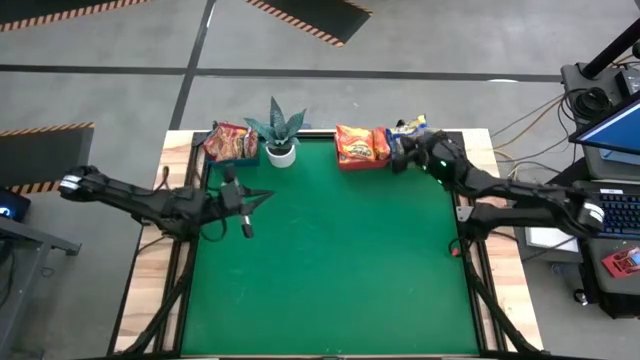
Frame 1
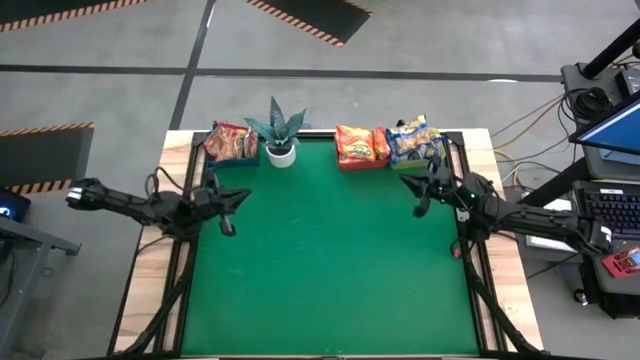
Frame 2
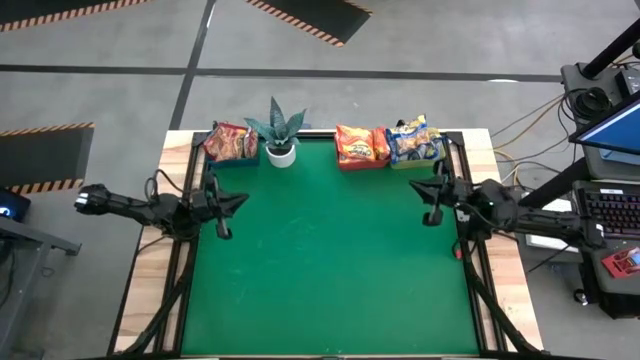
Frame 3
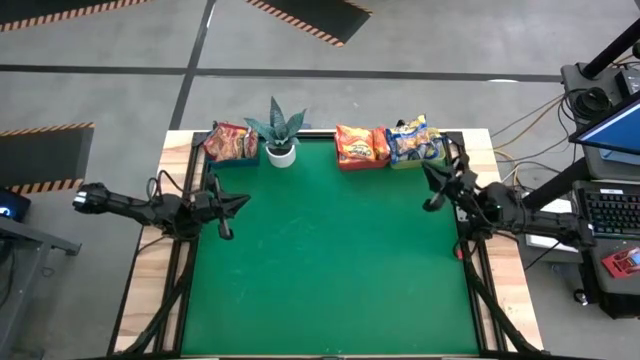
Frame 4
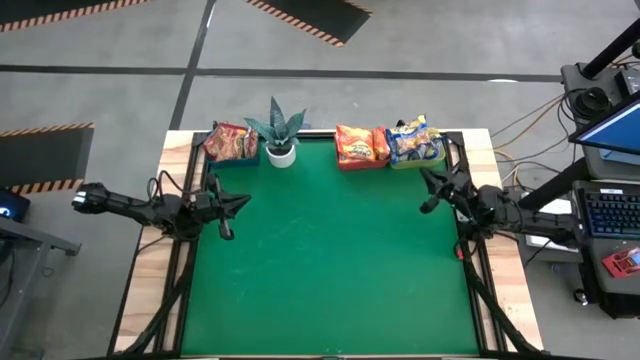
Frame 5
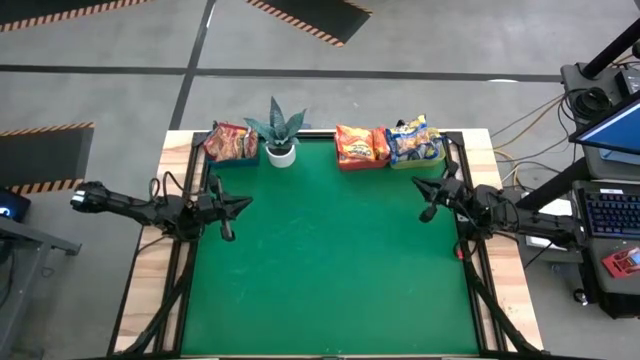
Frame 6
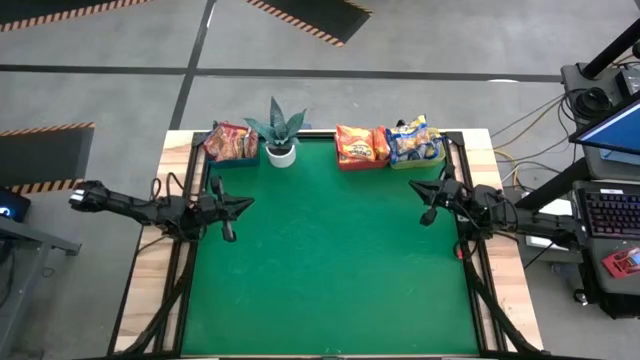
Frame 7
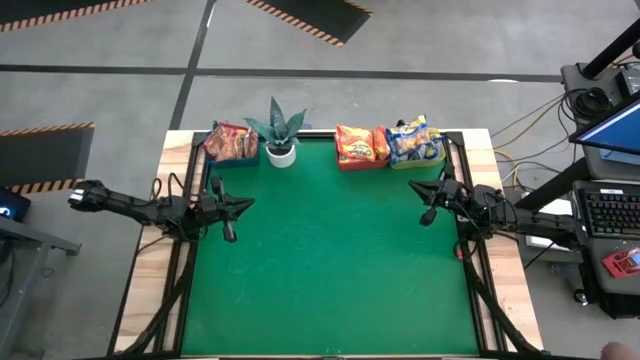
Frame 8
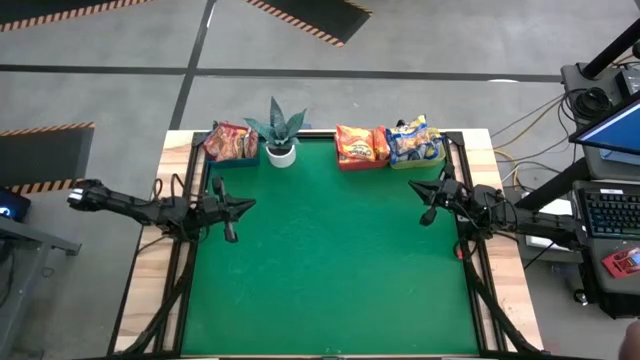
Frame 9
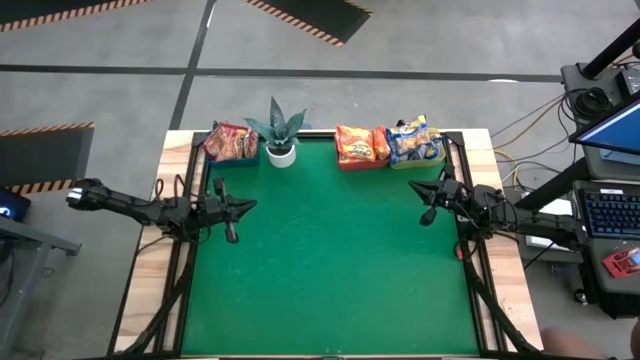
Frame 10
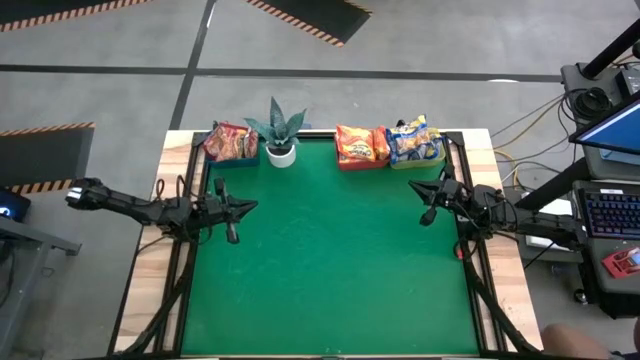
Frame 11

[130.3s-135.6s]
Task: Sort Maruchan noodles
Return to Home Position

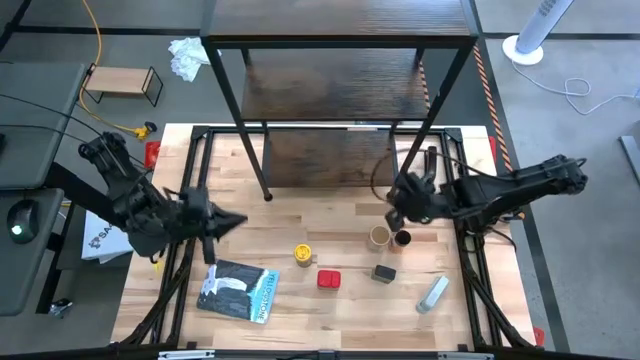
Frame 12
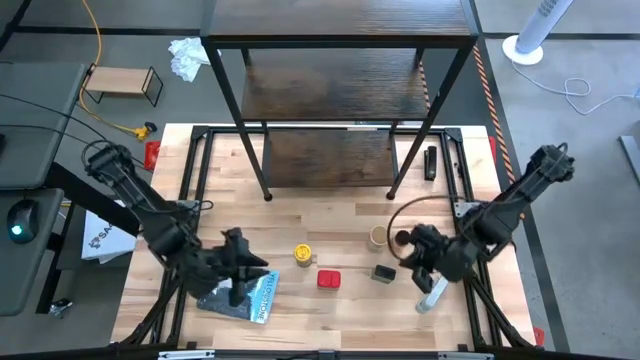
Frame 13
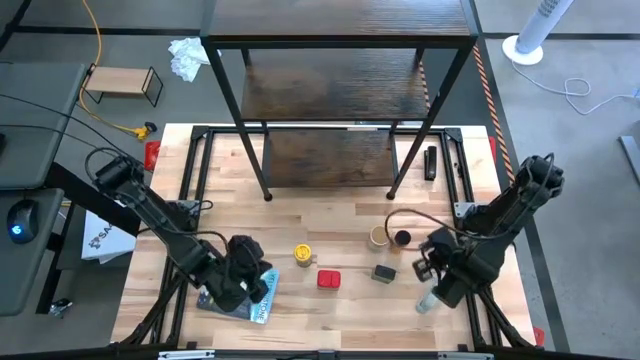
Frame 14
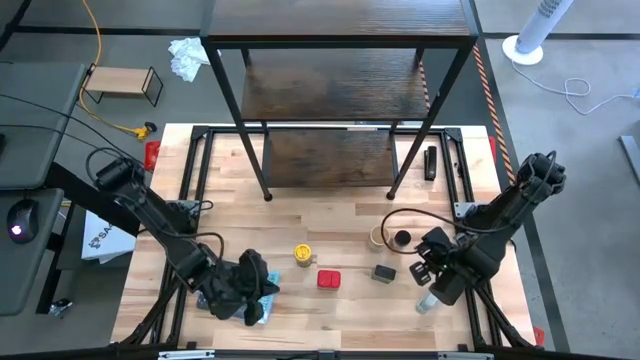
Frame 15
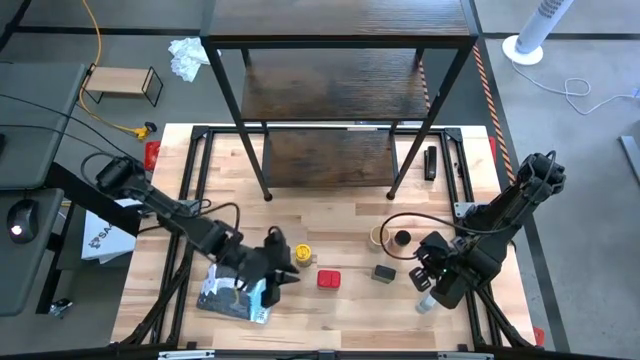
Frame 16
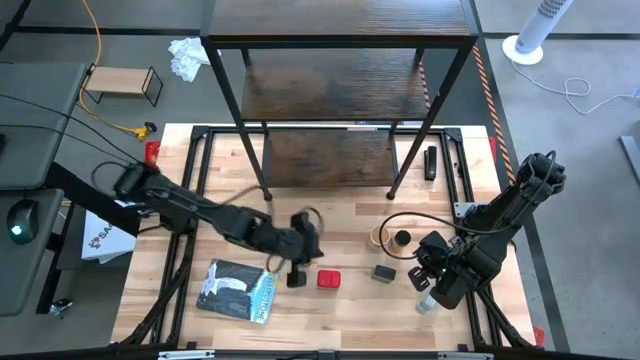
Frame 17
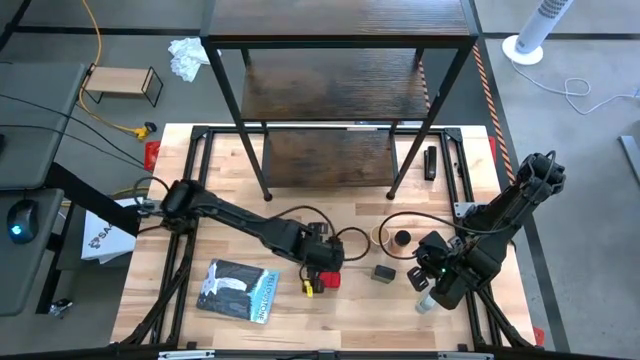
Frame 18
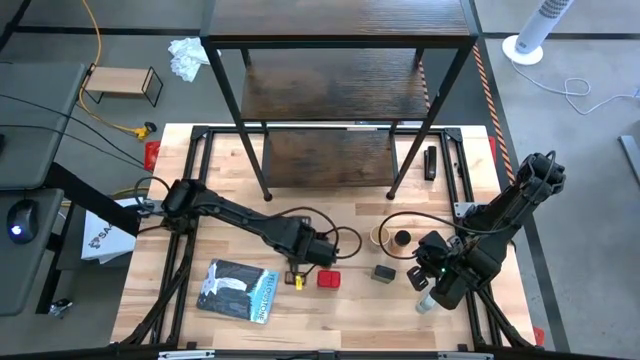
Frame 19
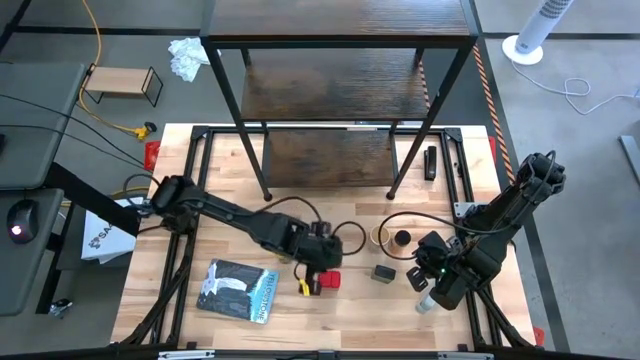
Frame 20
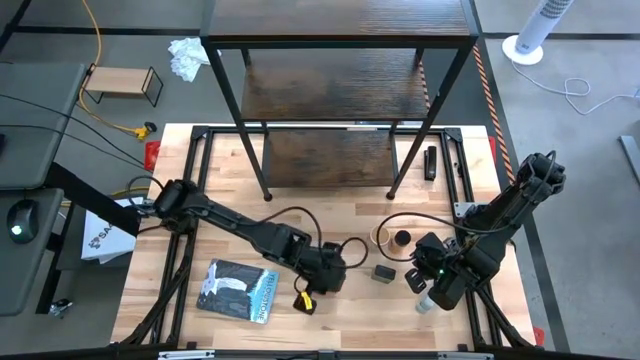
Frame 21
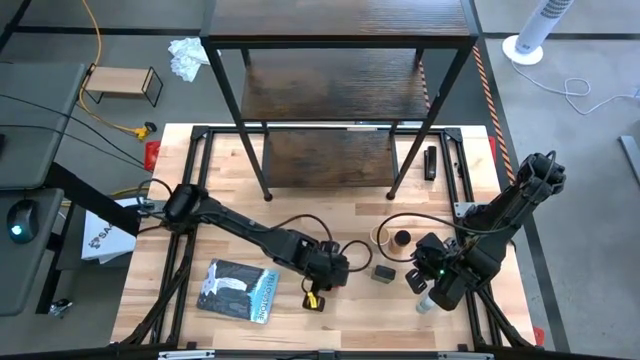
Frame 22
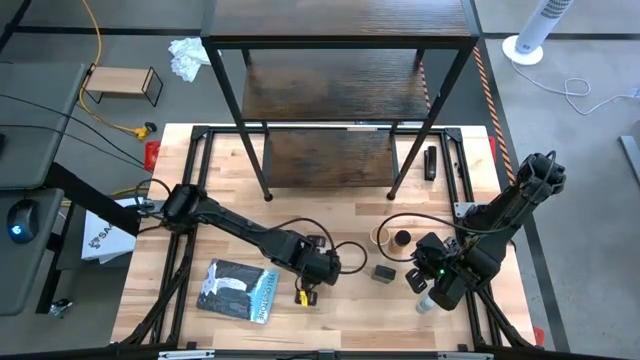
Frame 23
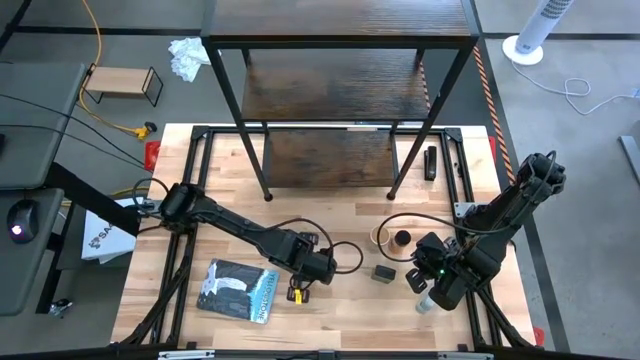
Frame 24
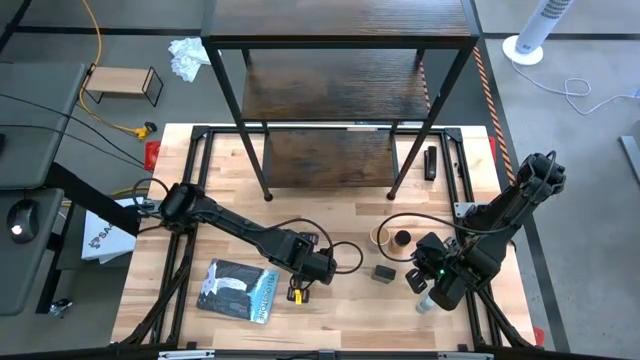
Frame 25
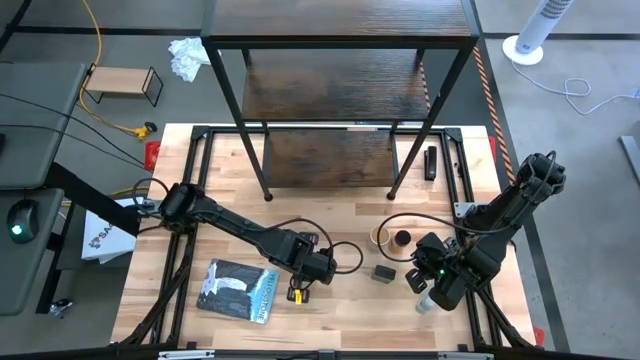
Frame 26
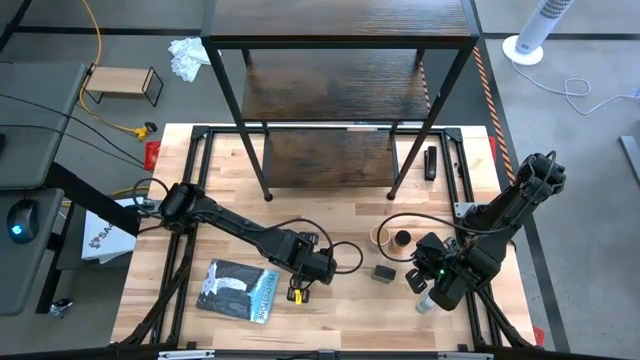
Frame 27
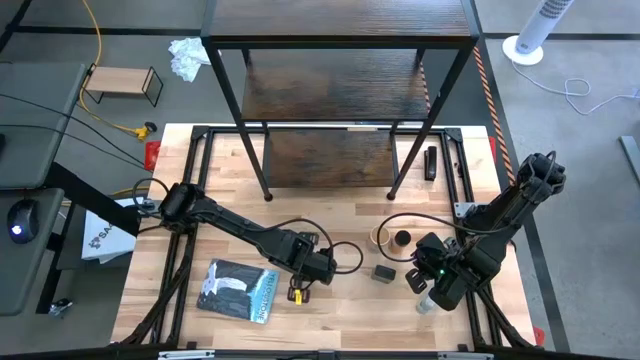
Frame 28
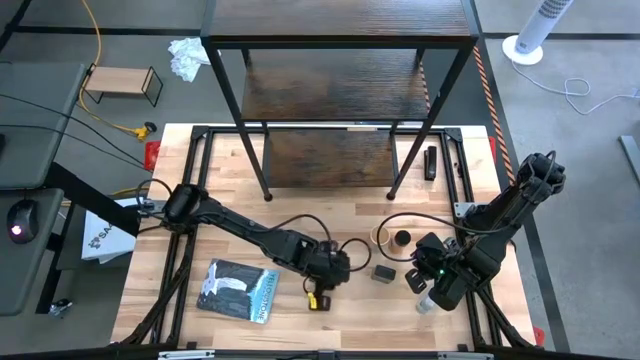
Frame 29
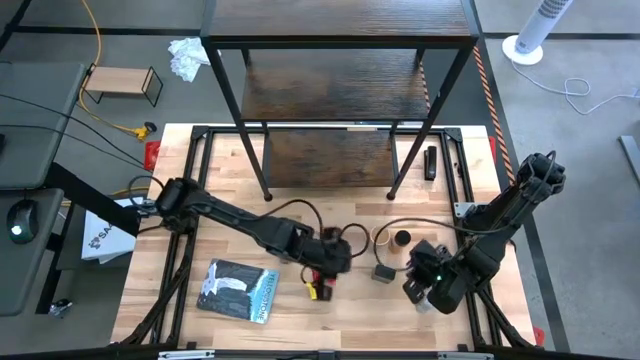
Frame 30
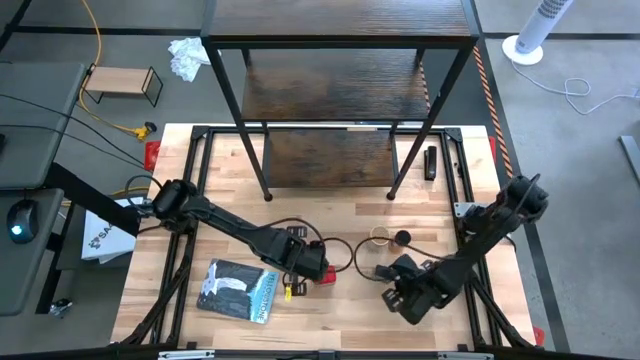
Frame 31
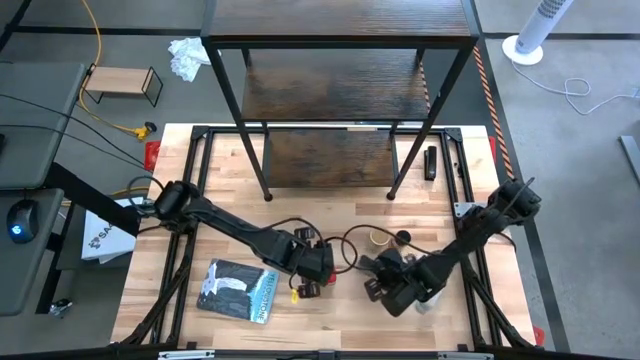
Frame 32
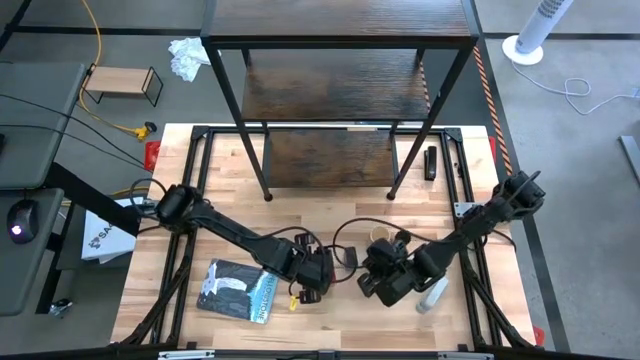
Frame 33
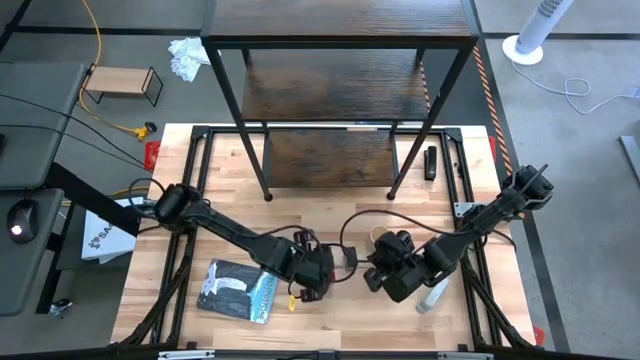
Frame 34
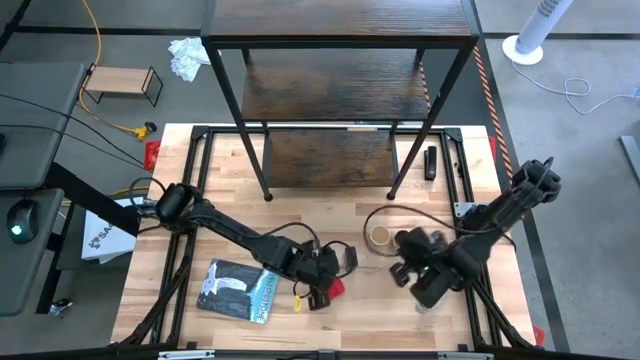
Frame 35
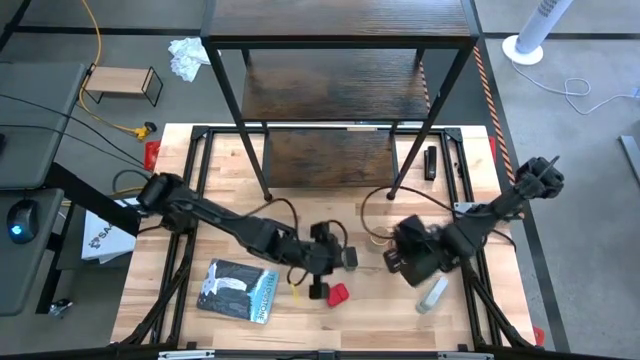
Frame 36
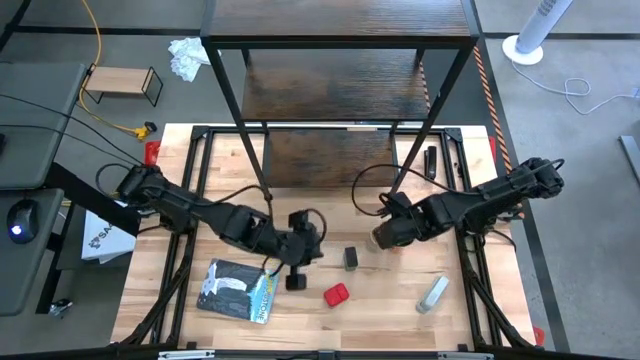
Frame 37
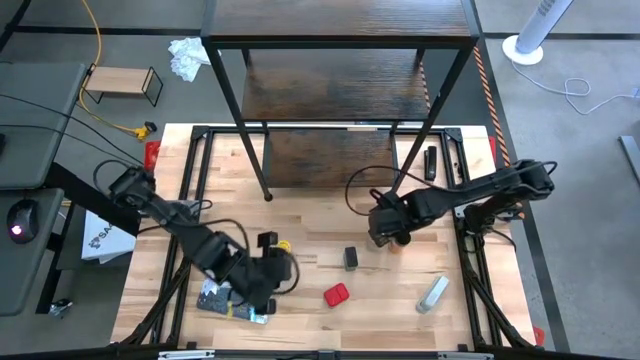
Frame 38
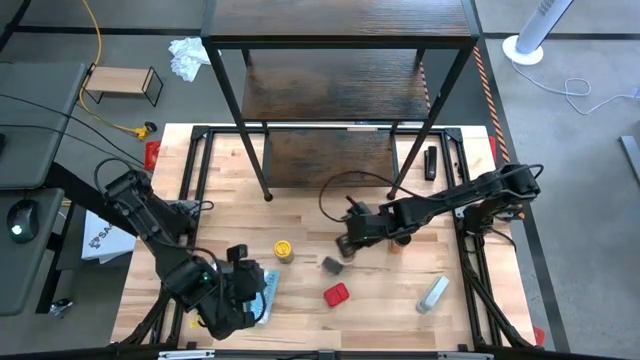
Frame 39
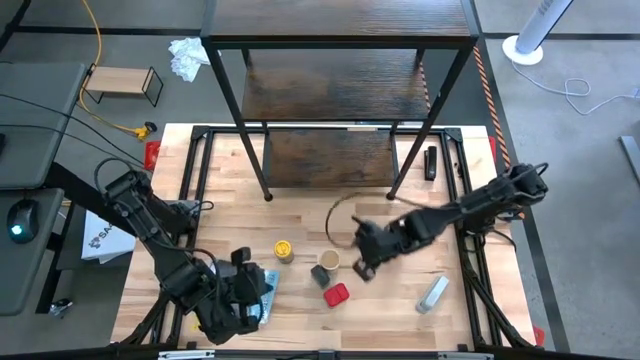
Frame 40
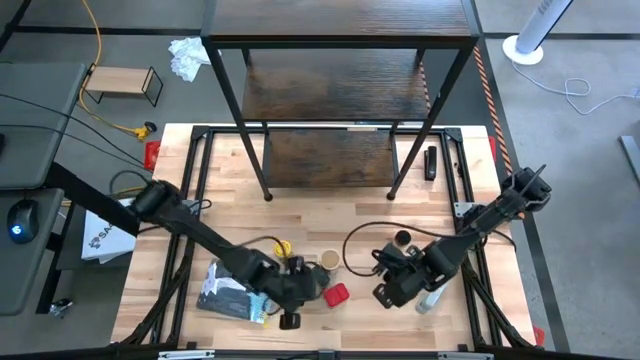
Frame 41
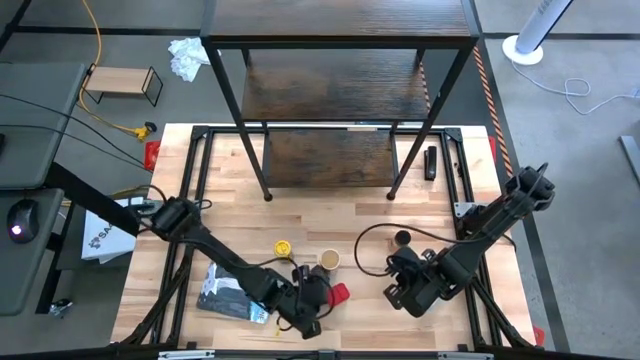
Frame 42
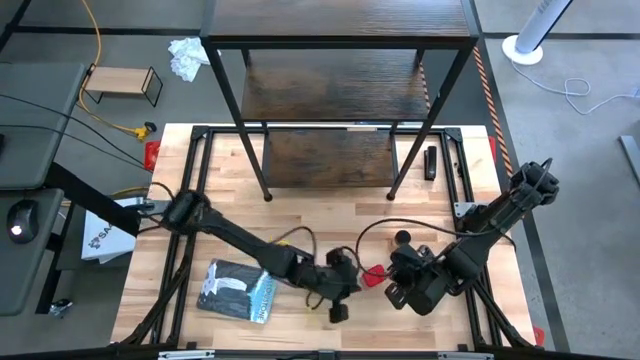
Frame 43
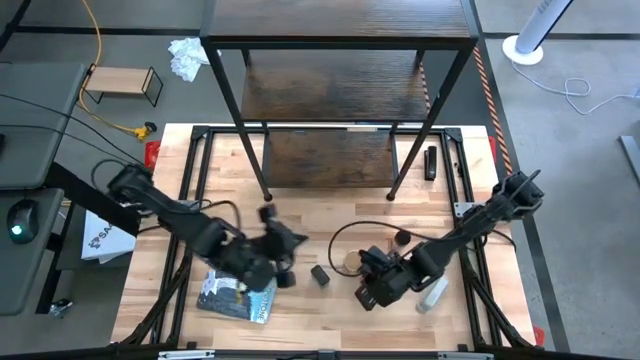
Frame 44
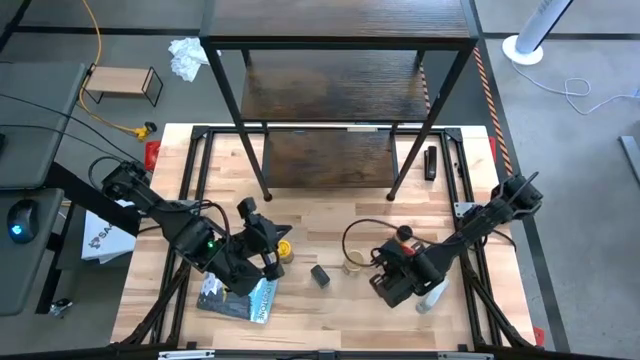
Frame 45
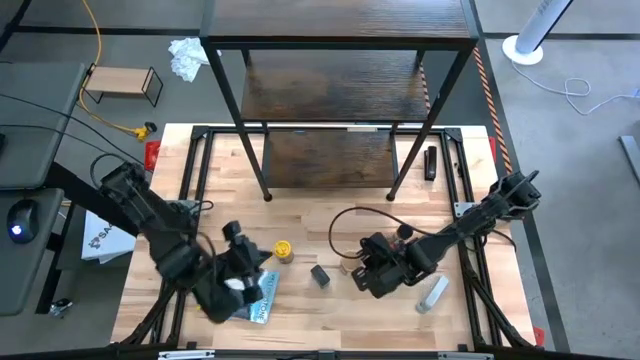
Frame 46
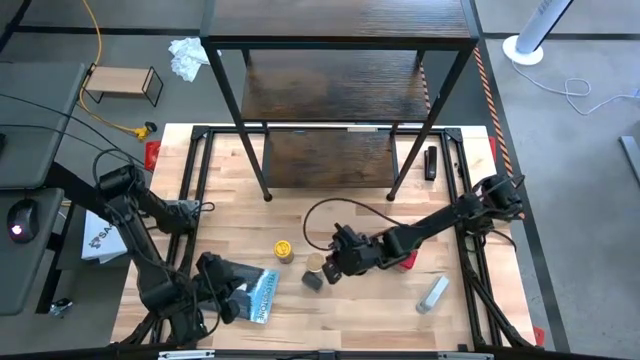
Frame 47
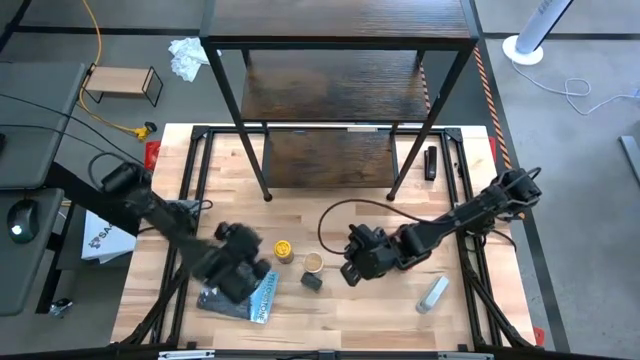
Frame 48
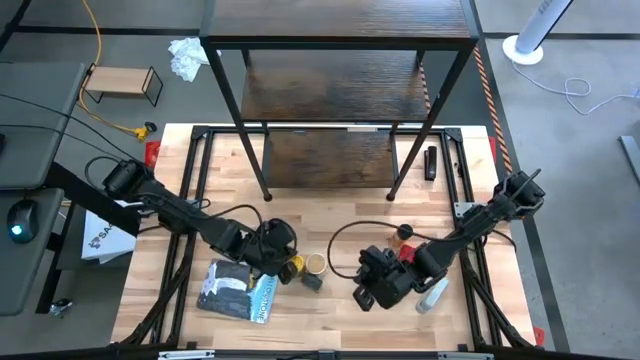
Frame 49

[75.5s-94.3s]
Task: Shelf spices
Adjust the seasoning bottles and cans
